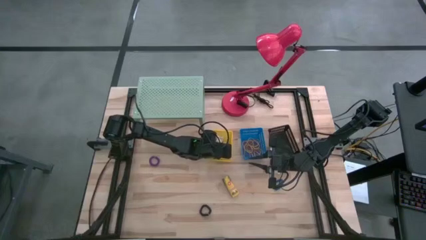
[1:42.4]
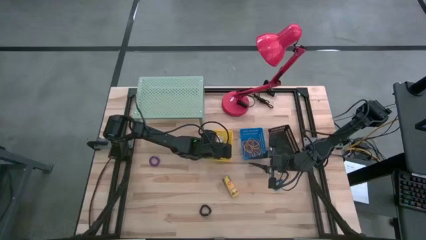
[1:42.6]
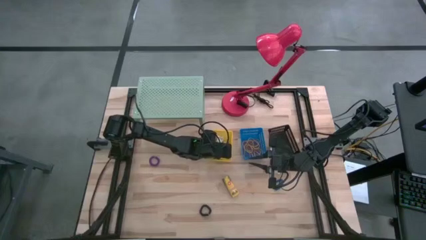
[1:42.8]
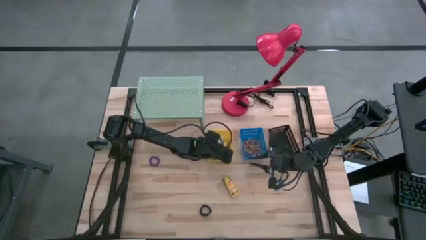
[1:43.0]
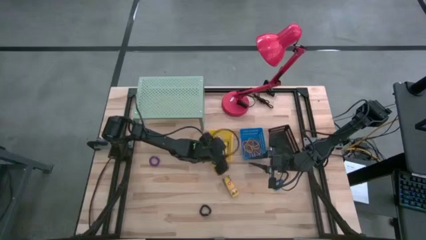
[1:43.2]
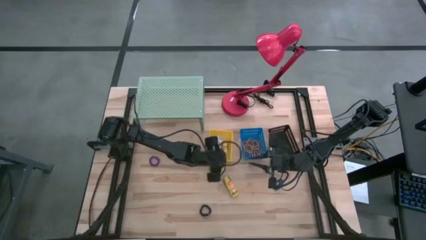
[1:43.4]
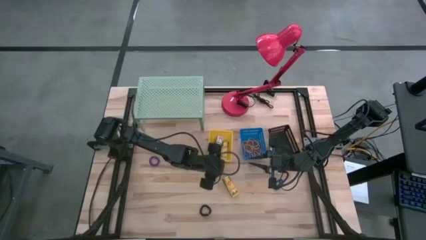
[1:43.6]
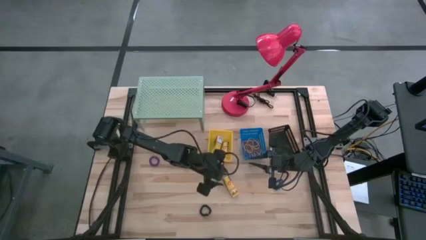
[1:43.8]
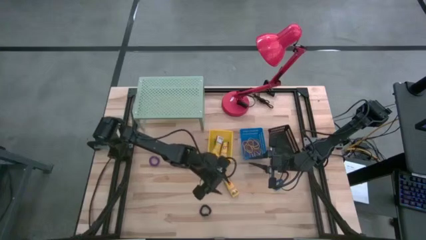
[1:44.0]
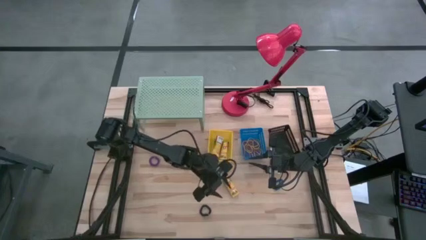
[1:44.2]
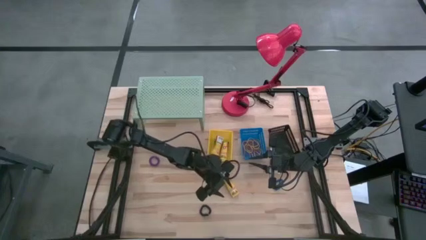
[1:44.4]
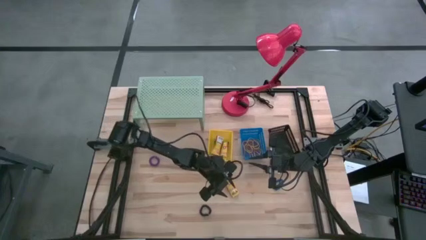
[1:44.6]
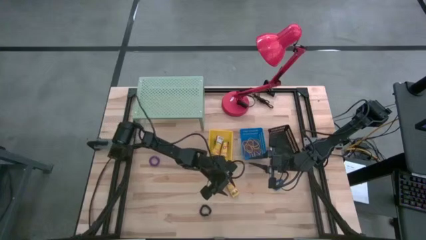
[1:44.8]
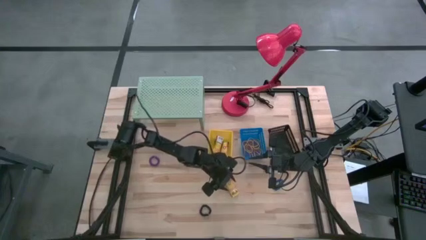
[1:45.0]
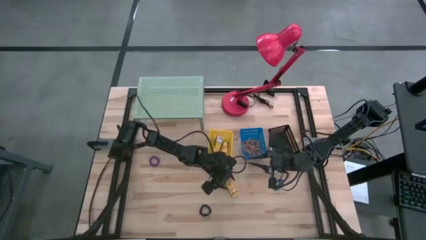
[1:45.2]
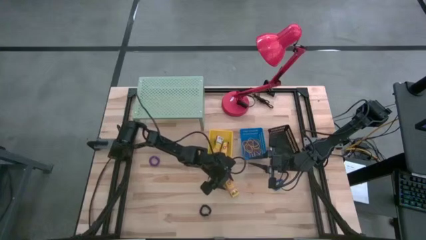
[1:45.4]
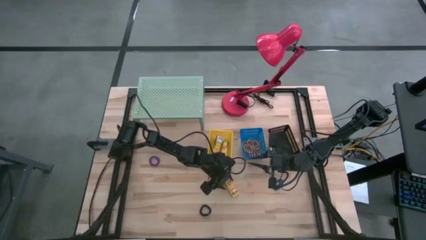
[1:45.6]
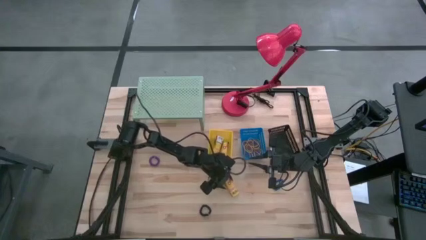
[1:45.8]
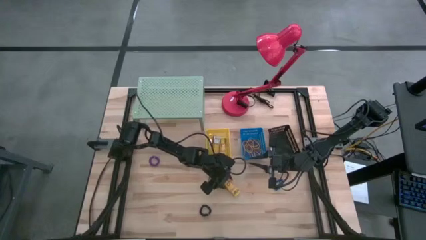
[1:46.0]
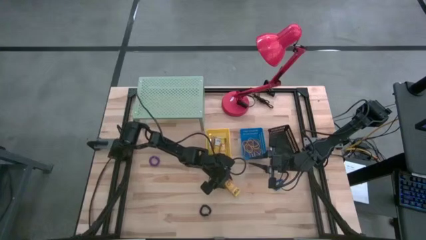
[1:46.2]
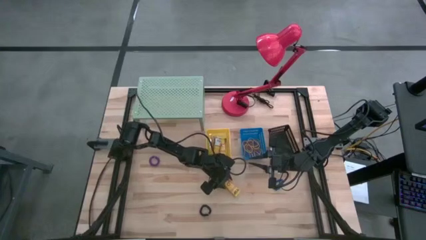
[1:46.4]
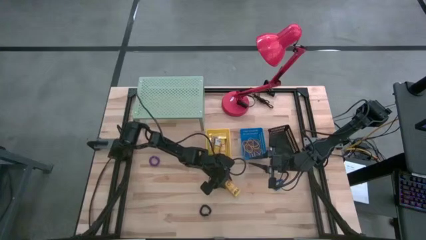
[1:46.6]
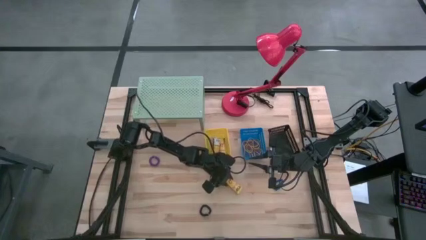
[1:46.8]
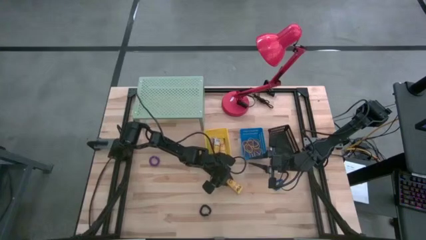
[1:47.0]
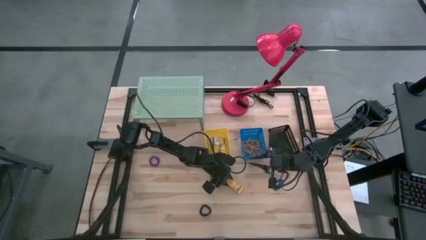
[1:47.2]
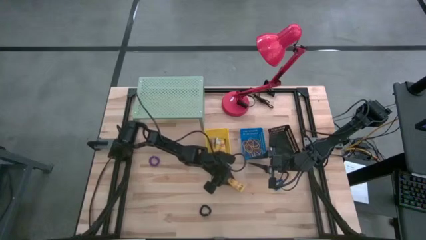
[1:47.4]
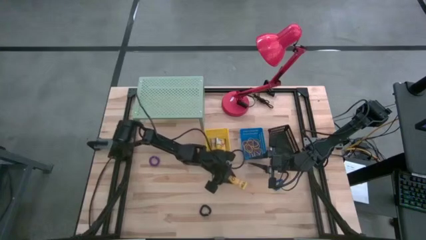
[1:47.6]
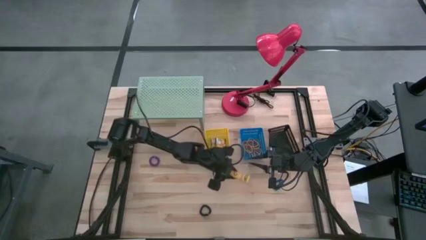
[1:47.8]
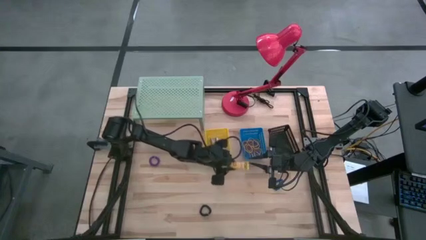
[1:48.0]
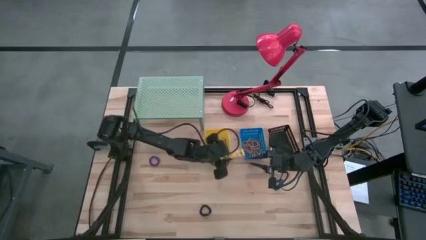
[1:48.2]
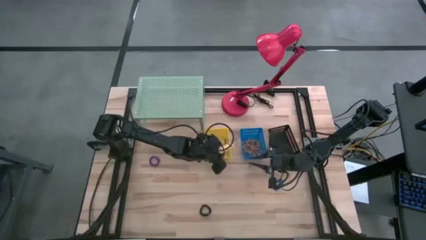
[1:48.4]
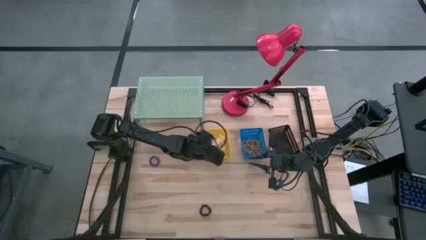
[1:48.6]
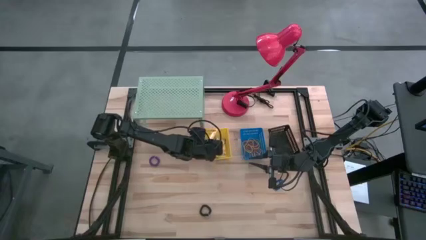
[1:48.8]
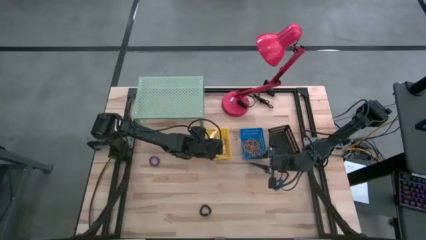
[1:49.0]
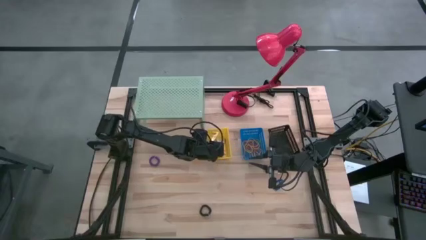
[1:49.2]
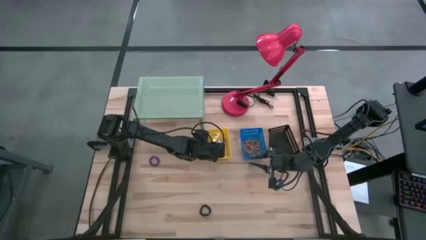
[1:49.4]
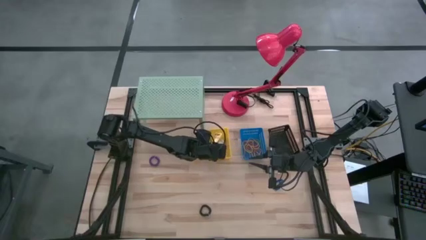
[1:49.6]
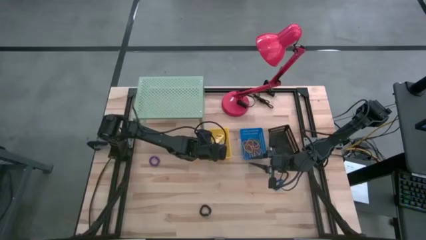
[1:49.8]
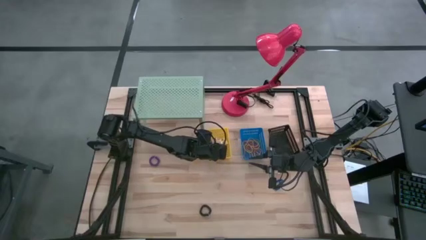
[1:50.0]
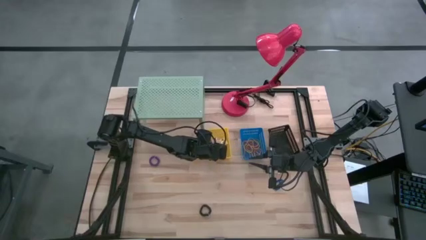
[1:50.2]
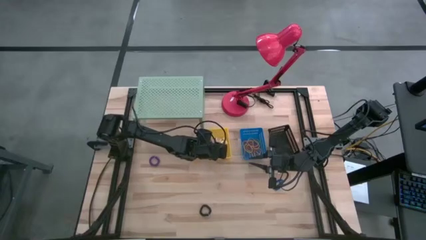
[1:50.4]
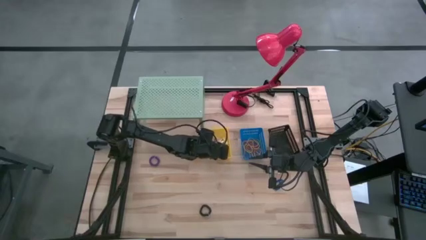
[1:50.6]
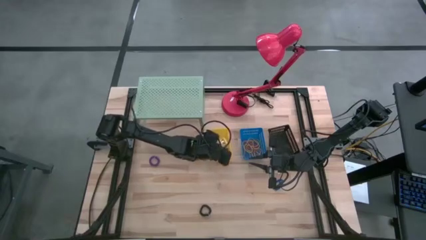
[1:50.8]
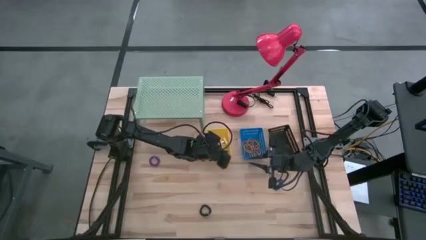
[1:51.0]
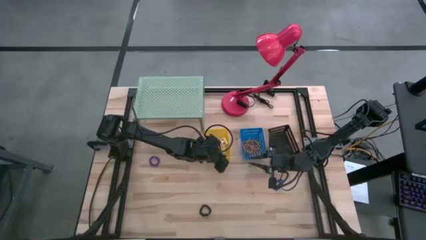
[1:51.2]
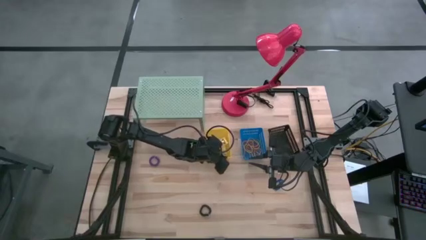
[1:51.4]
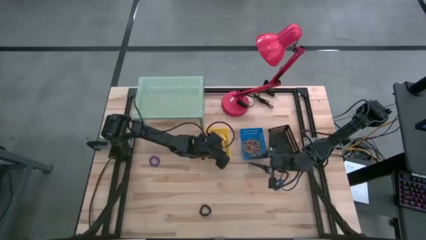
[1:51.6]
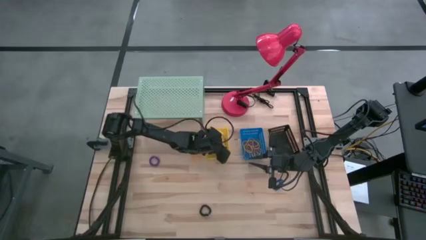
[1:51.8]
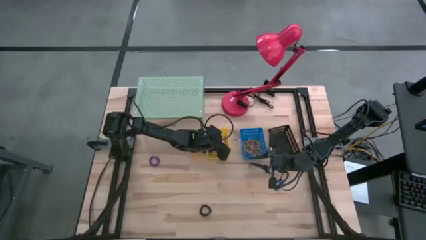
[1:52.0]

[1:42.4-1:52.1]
Task: Pick & Place Office Desk Supplies
Put the crayon box into the yellow basket

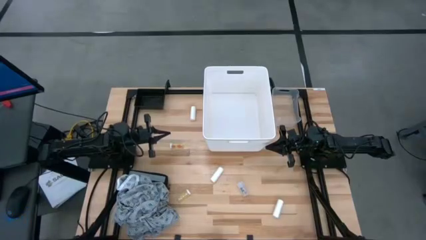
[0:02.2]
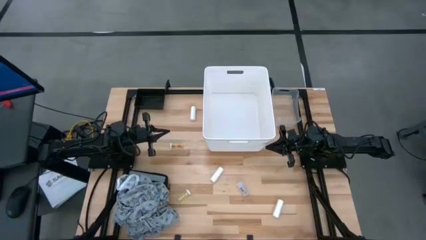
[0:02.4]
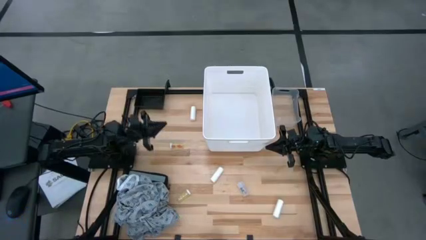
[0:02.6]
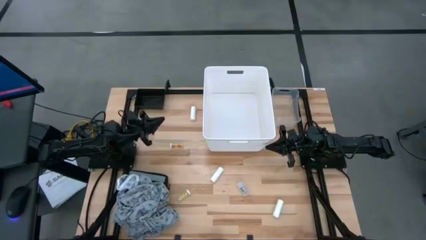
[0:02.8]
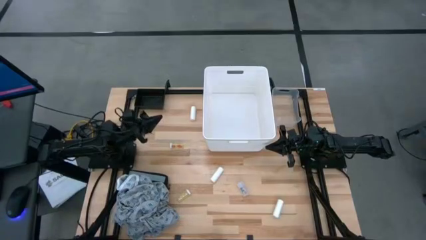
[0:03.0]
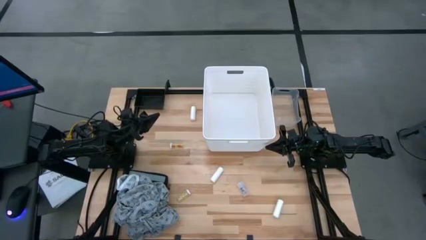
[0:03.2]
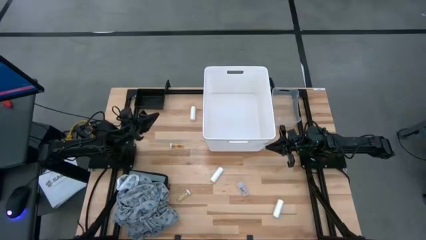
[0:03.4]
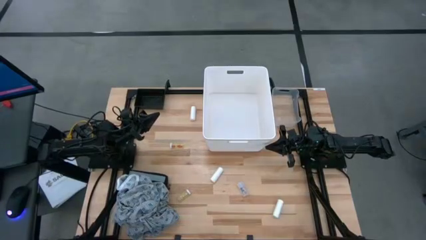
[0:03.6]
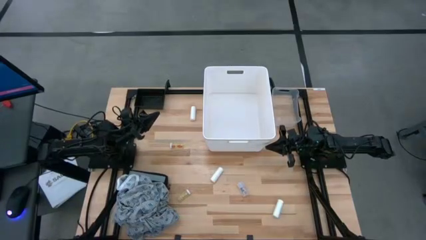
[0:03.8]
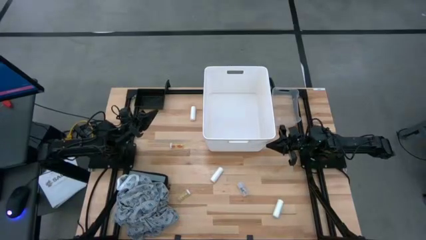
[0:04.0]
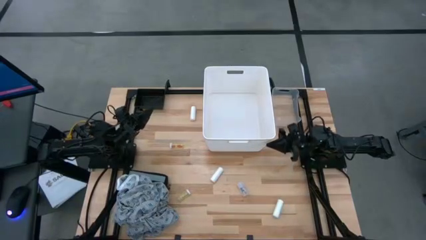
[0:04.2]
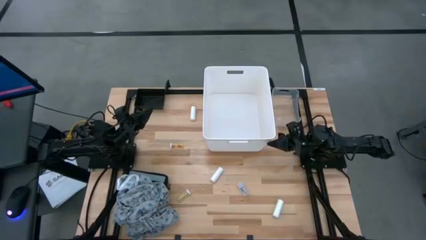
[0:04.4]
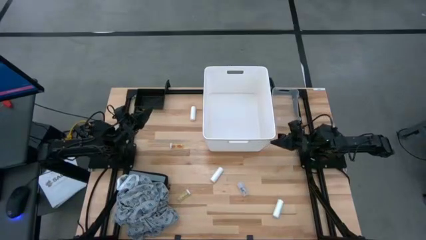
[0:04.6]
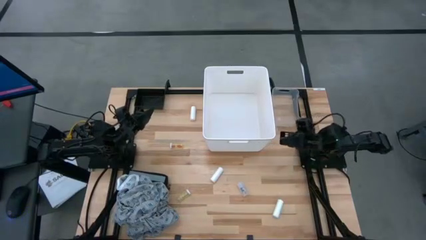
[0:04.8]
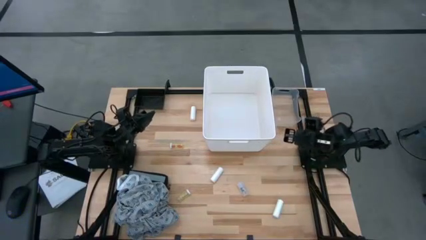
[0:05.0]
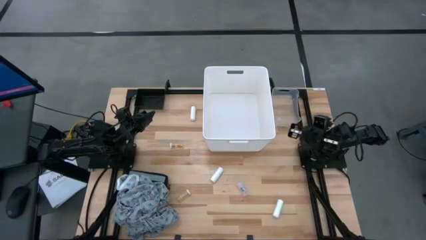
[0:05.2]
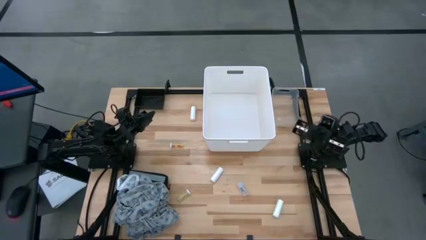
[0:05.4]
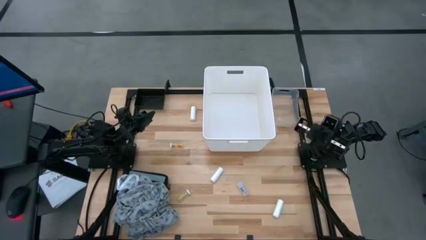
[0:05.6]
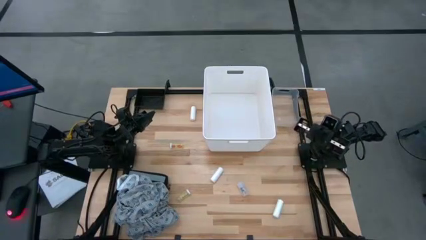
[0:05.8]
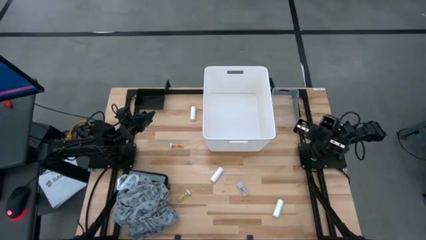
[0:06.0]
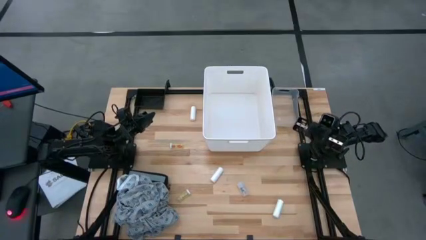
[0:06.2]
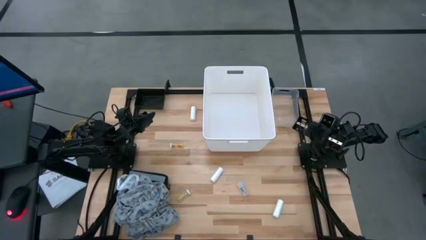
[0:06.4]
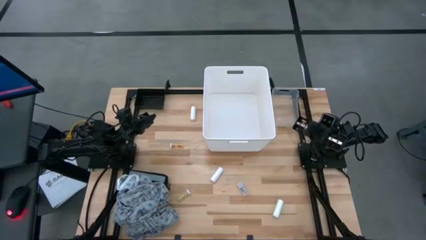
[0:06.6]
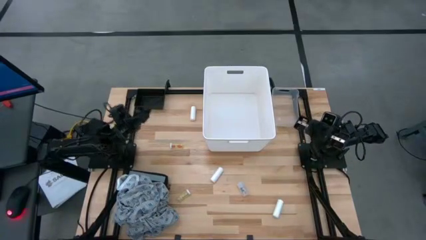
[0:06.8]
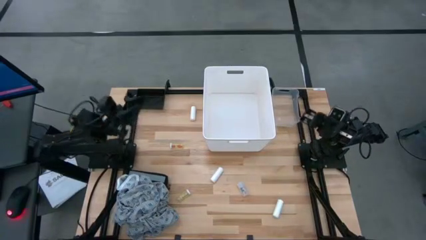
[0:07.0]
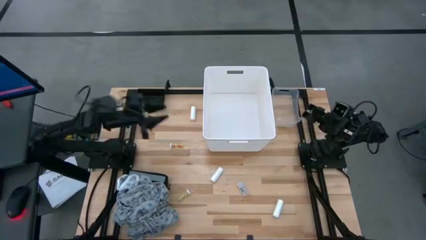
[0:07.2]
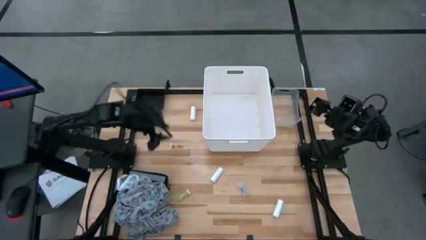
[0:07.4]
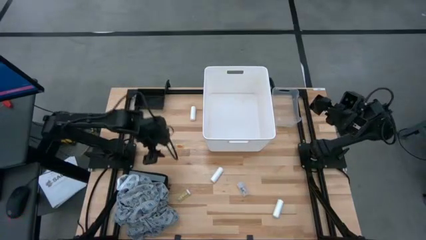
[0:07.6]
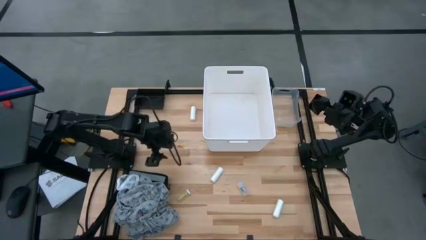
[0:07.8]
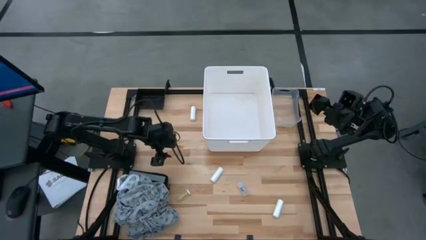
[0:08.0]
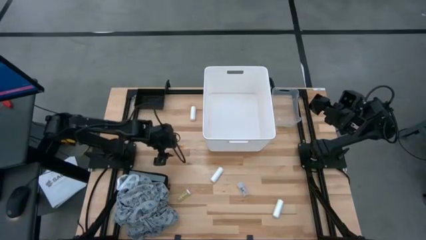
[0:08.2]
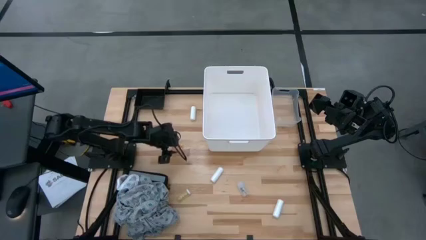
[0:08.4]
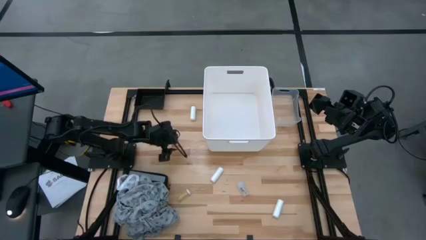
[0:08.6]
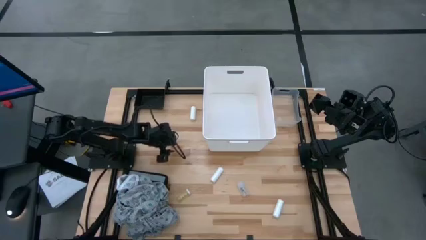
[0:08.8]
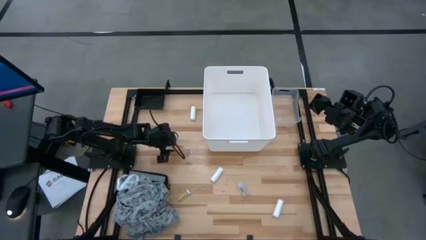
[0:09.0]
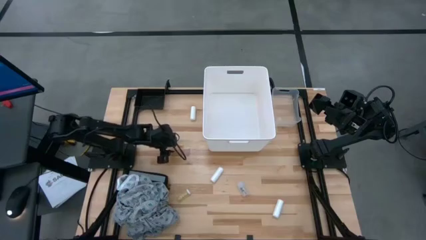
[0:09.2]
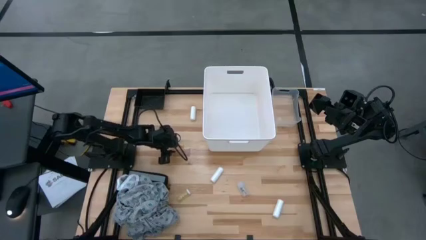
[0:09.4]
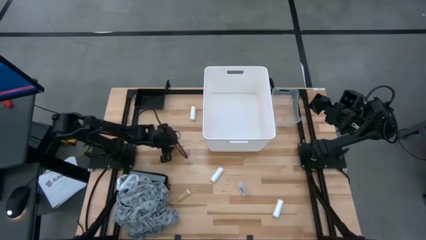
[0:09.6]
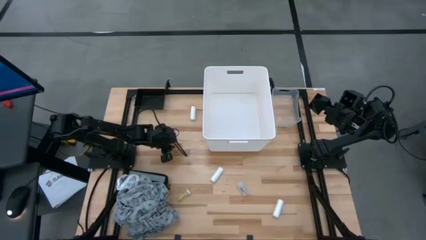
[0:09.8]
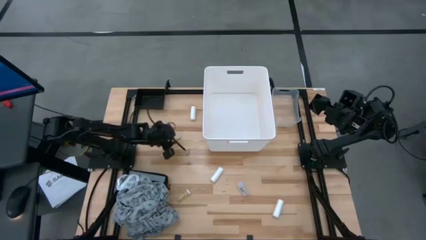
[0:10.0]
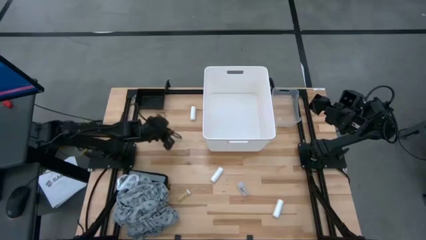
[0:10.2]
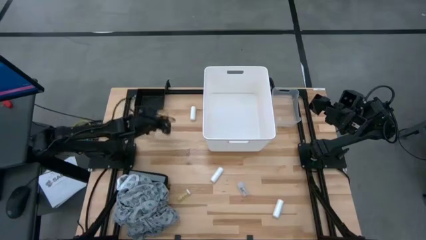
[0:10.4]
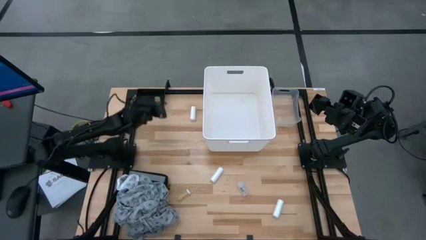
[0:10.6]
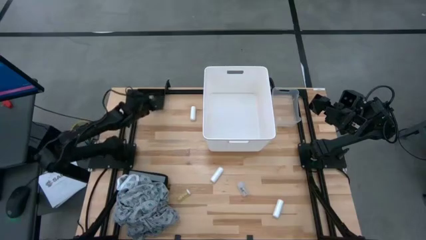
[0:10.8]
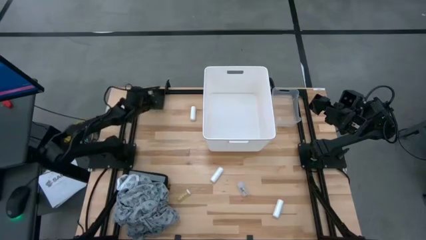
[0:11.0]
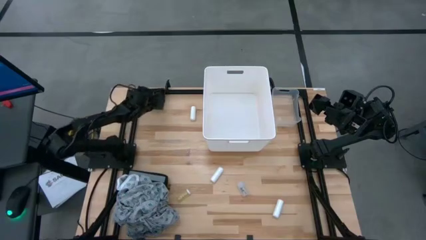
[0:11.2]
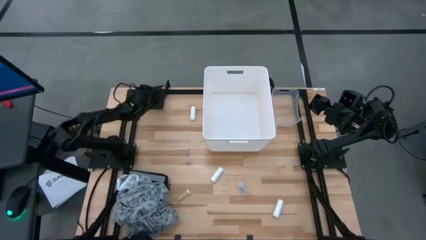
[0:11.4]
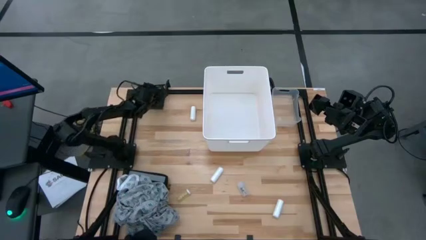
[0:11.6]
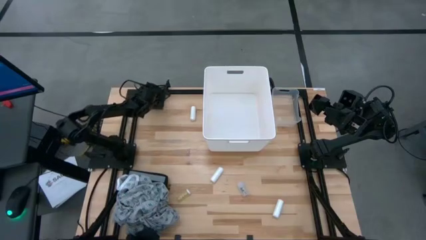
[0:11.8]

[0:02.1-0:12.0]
Task: Pick & place medical supplies in basket/bin
Put the top yellow pill bottle in the black bin
